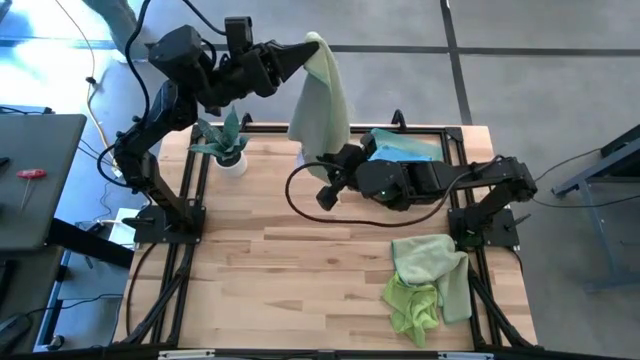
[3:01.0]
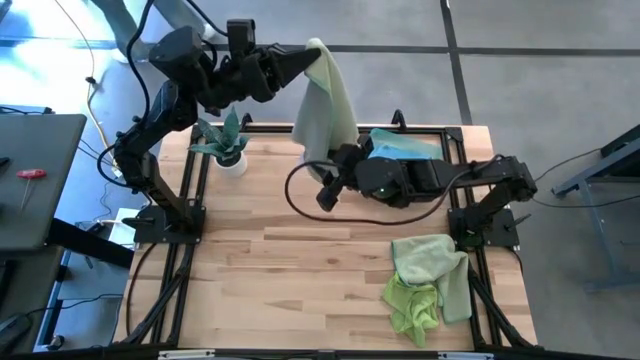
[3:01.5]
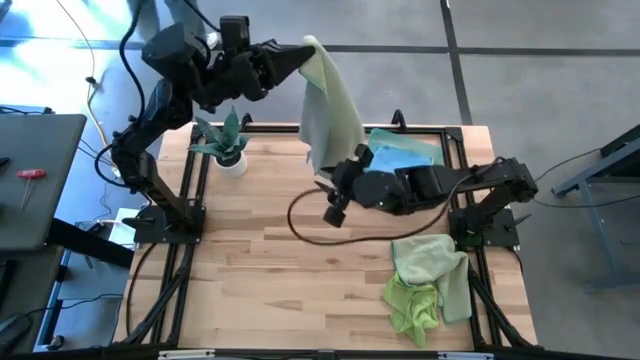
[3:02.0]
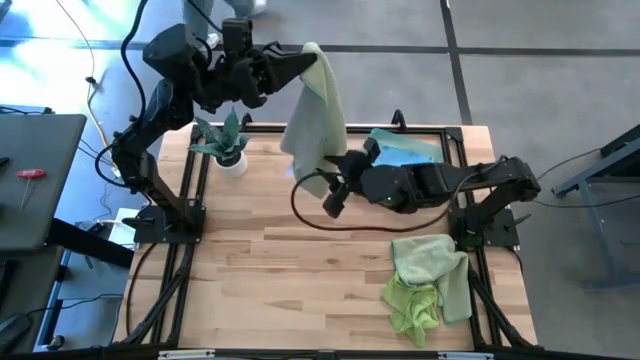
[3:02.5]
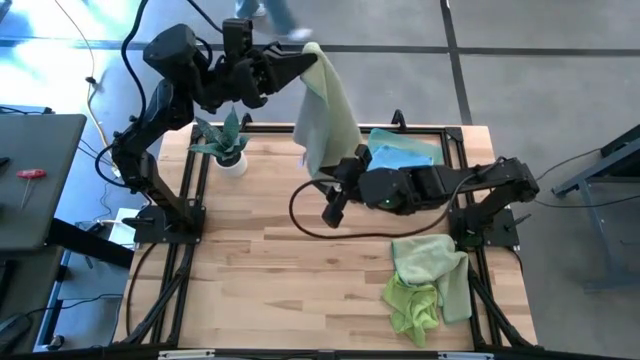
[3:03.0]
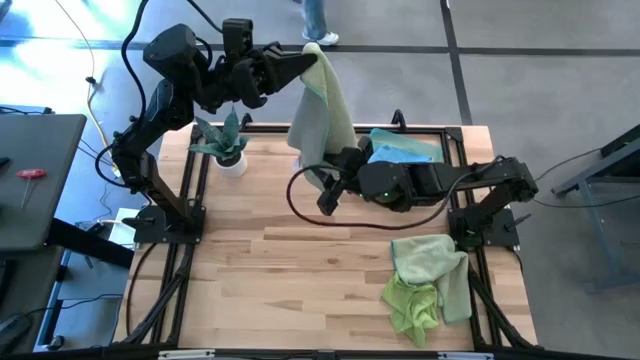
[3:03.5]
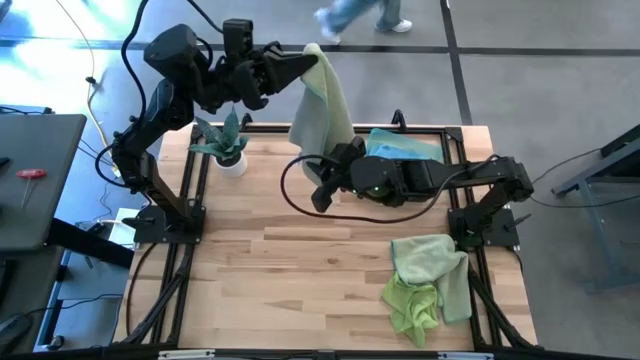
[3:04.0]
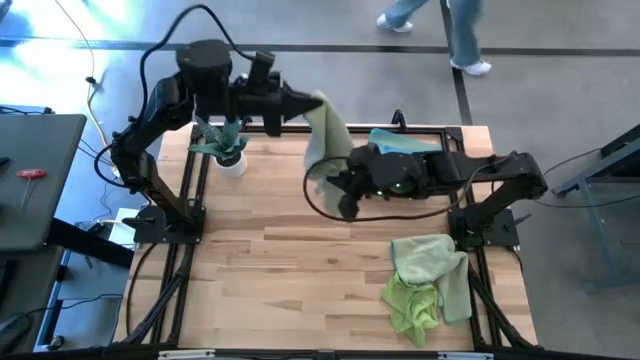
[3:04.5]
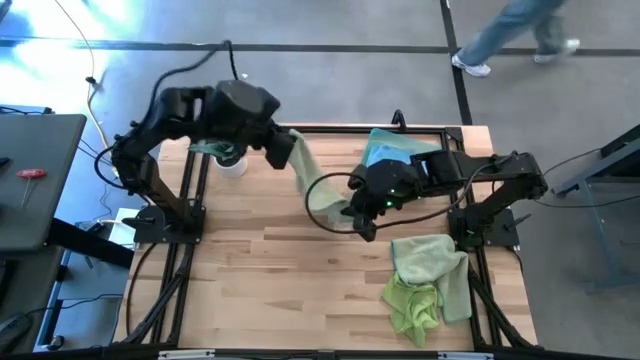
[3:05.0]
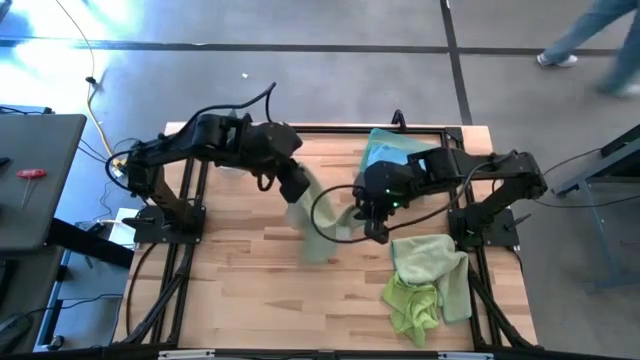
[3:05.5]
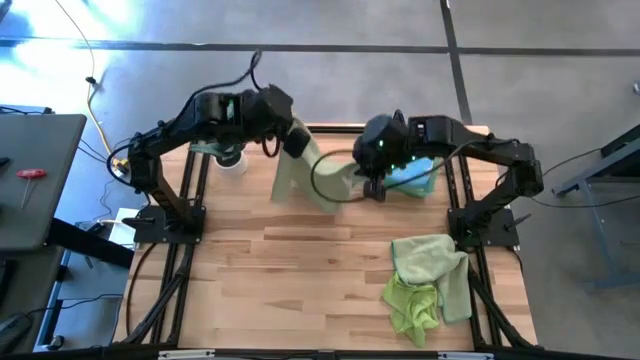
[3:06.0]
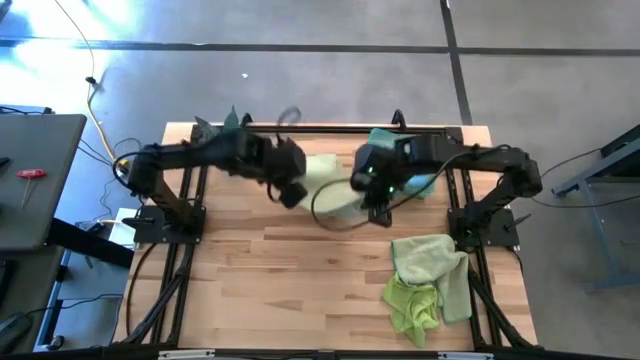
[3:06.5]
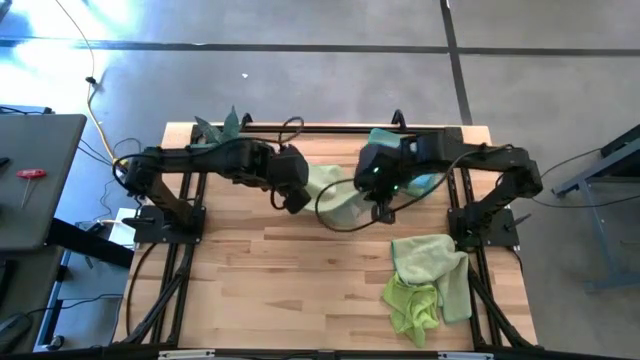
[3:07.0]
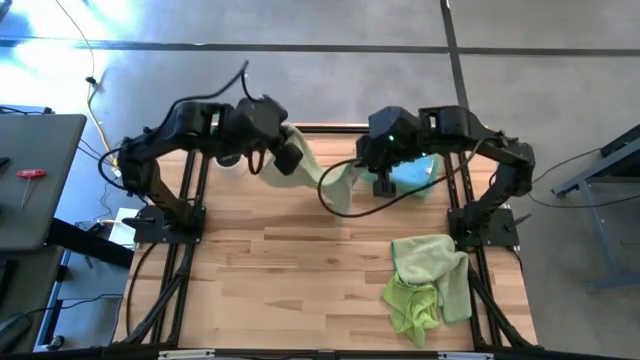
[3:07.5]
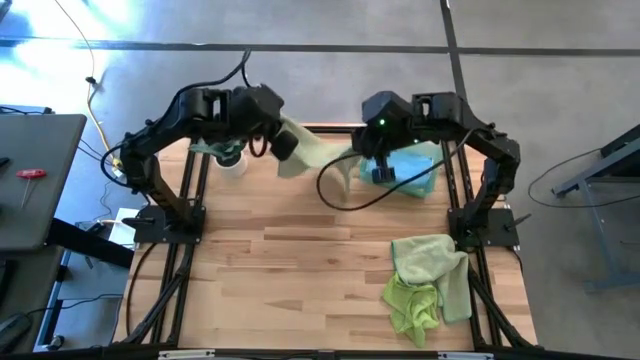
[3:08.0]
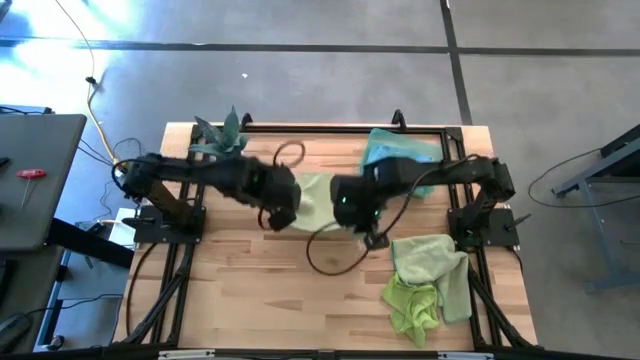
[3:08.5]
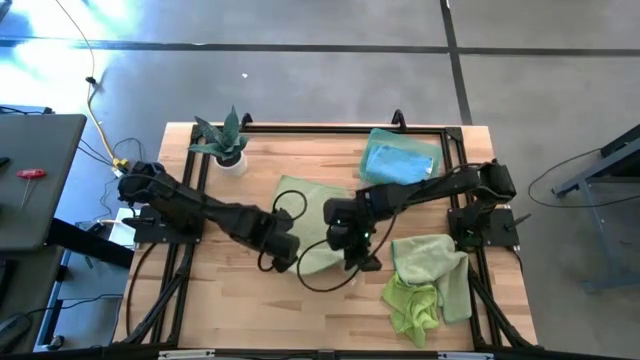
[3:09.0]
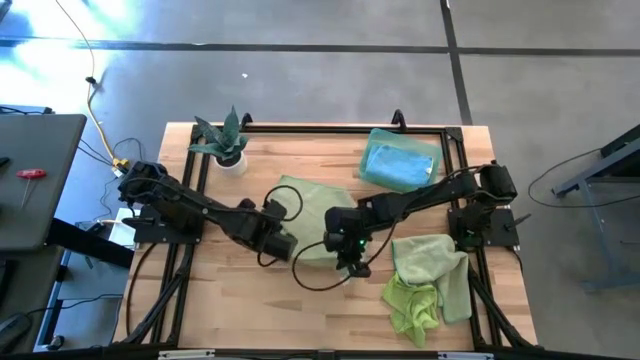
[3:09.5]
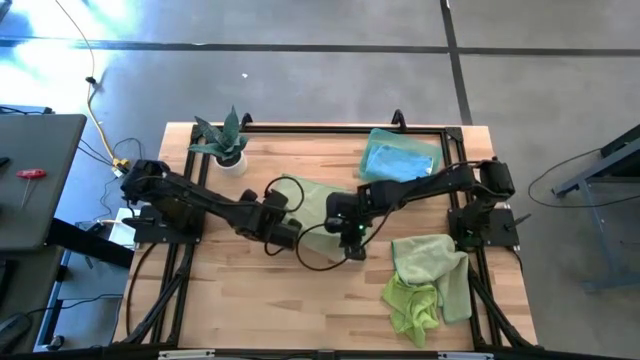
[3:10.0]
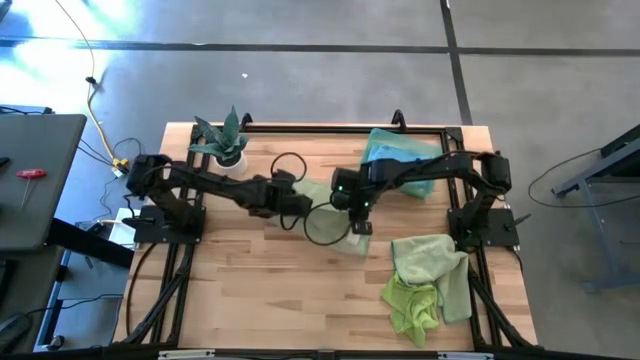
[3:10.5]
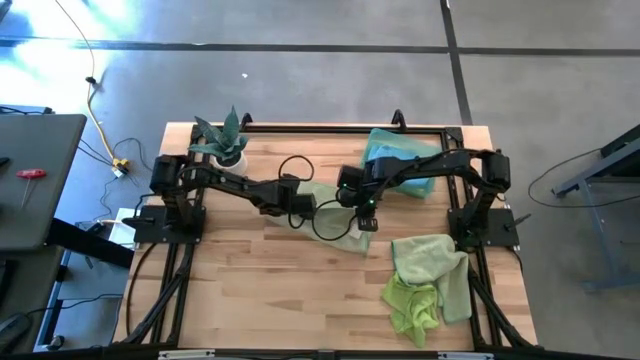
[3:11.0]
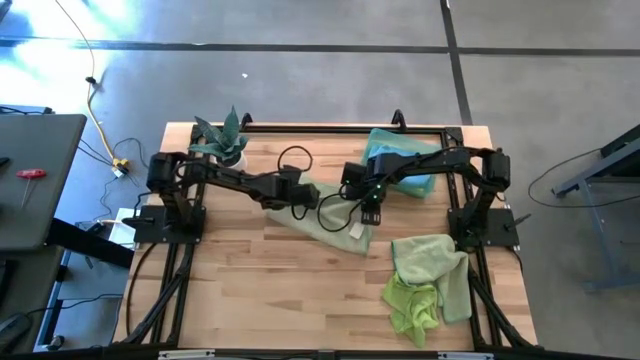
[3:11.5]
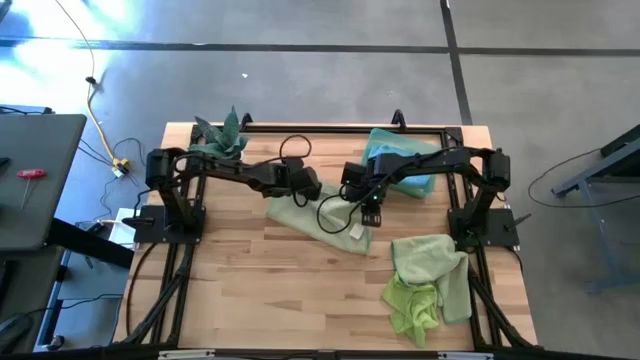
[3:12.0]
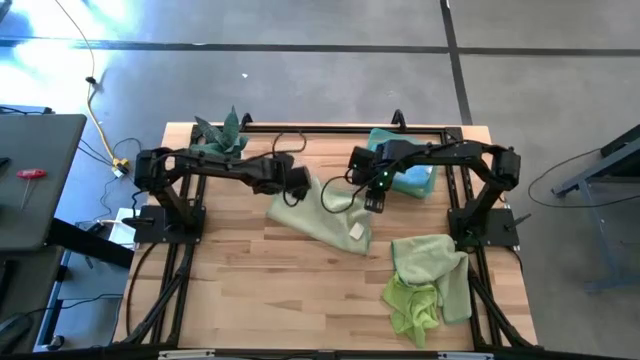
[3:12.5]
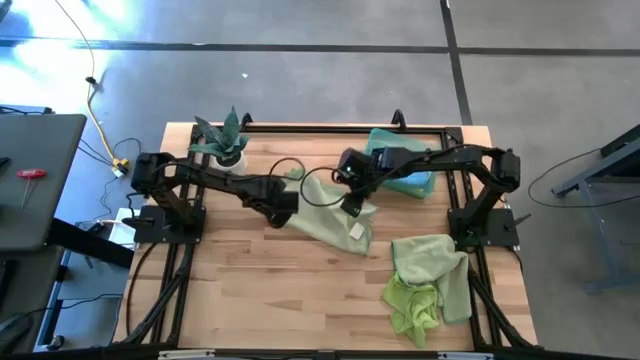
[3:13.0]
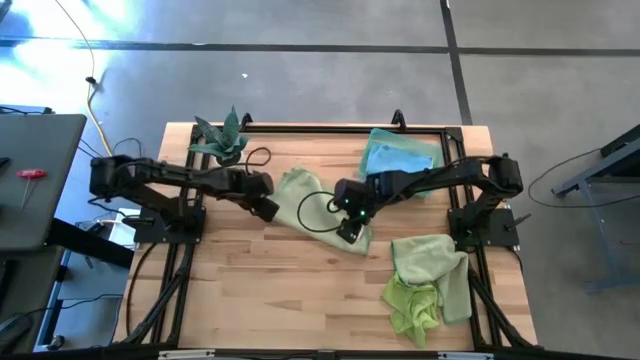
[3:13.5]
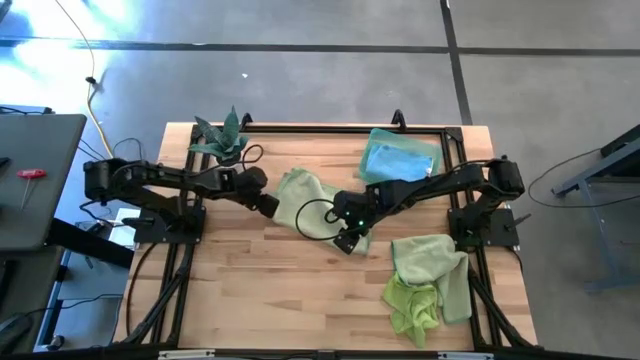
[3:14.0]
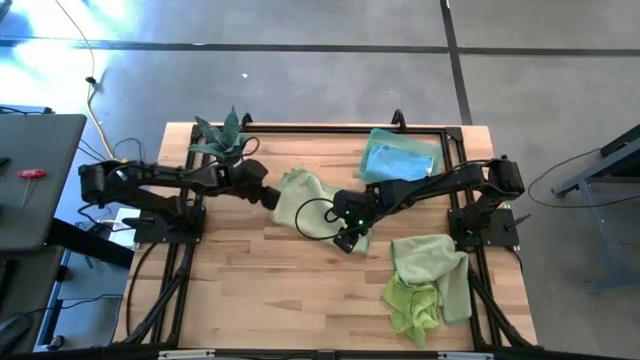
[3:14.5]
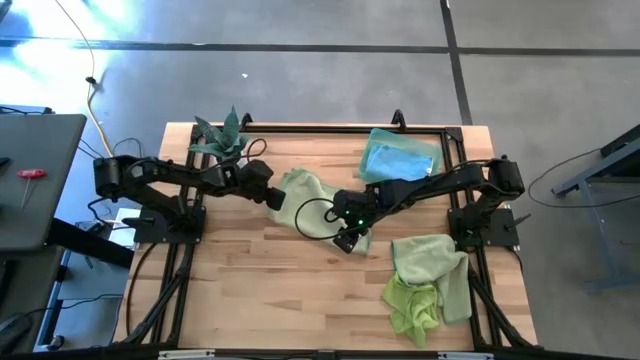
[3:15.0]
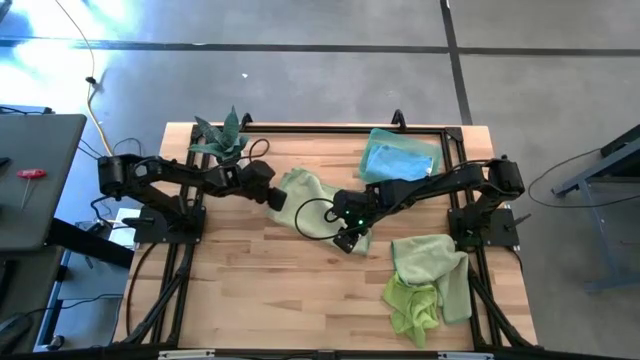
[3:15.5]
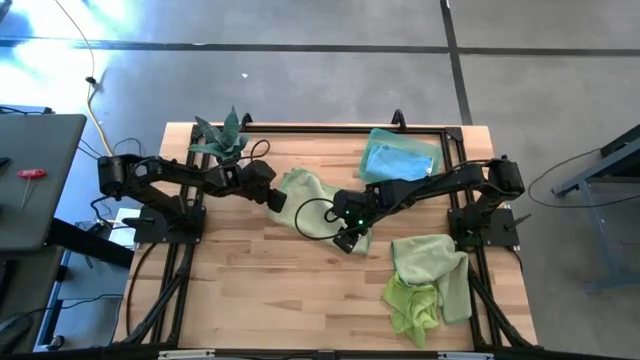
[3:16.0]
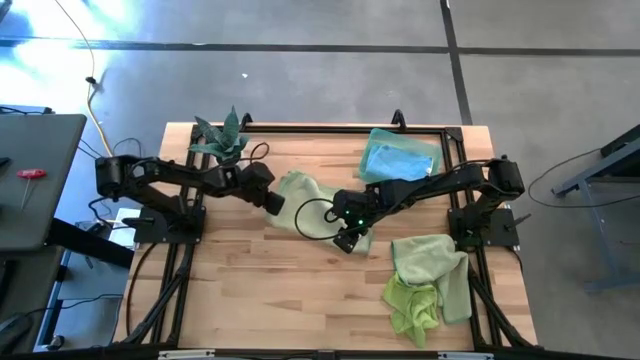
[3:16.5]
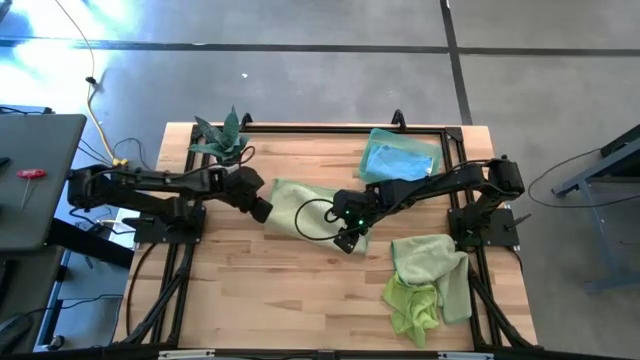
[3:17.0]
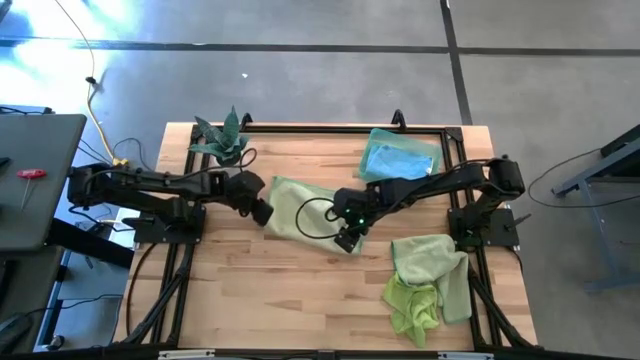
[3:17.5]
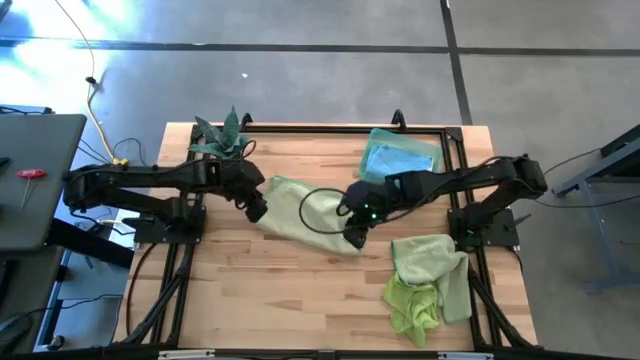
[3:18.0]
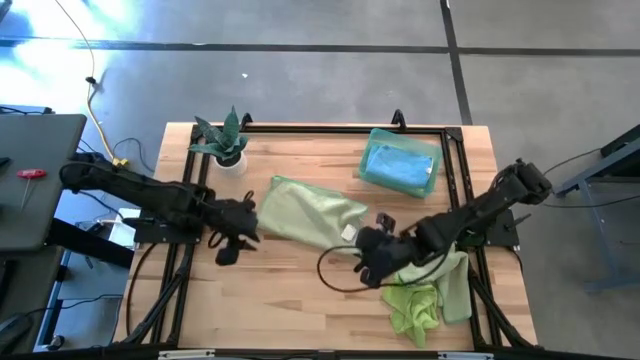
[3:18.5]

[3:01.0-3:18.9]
Task: Fold microfiber towels
Fold the left green microfiber cloth

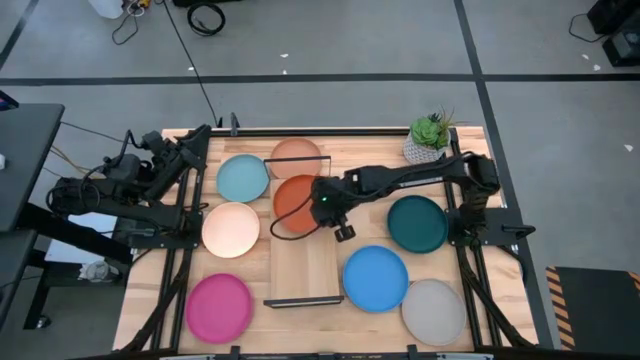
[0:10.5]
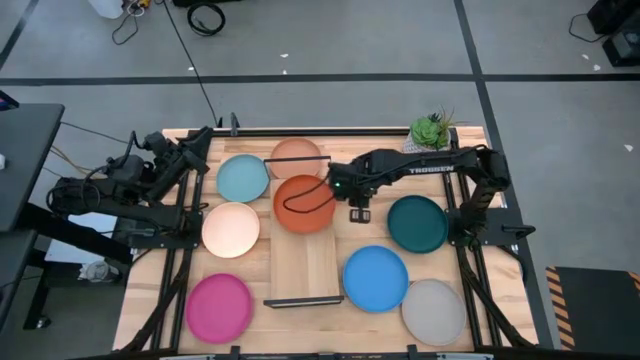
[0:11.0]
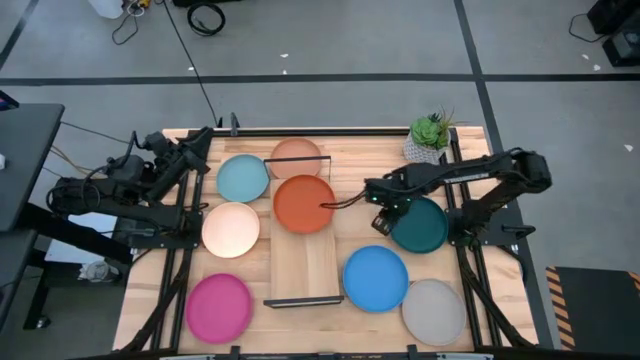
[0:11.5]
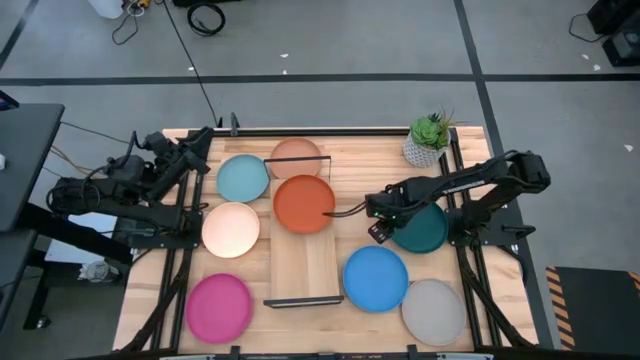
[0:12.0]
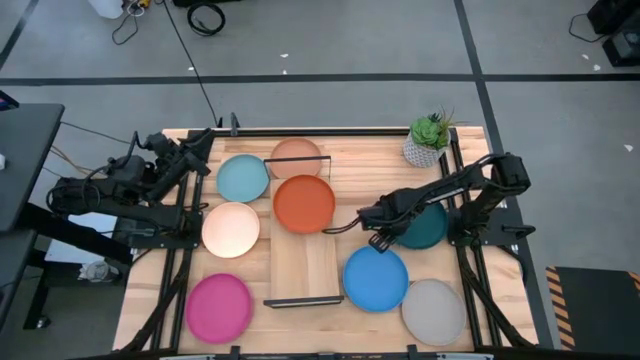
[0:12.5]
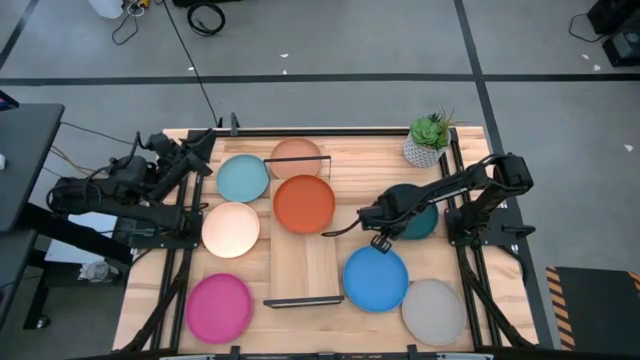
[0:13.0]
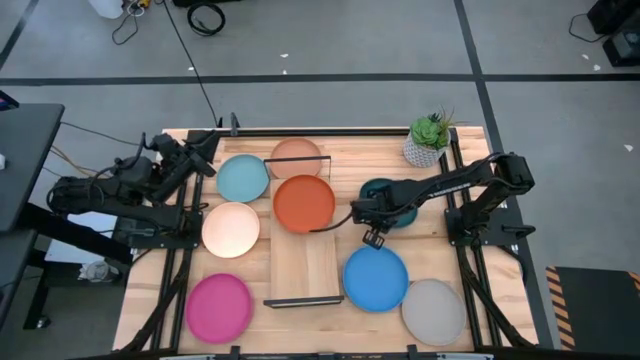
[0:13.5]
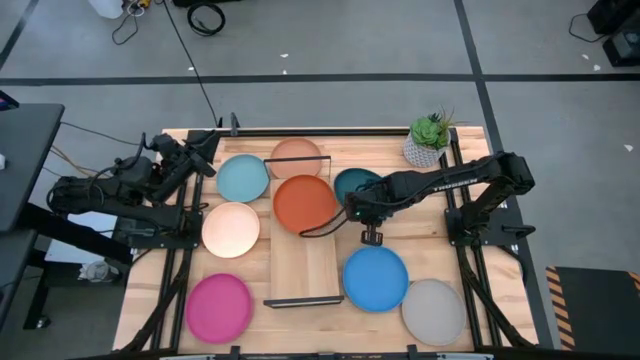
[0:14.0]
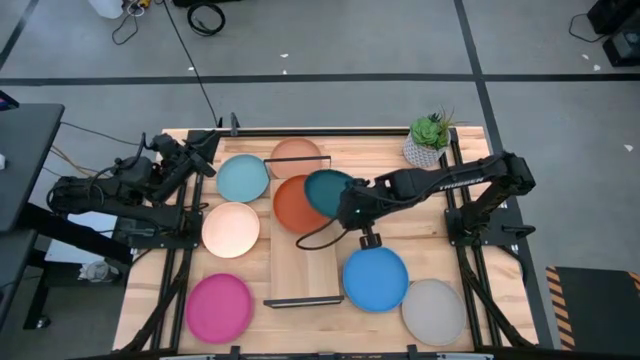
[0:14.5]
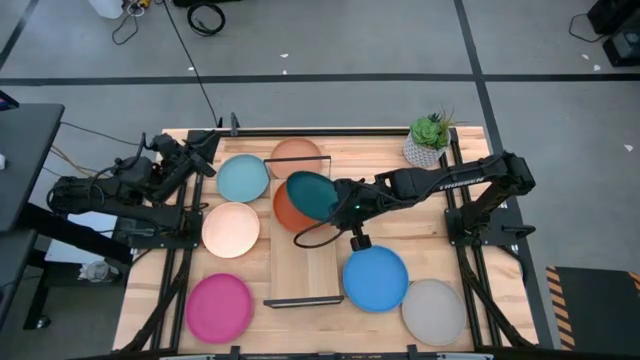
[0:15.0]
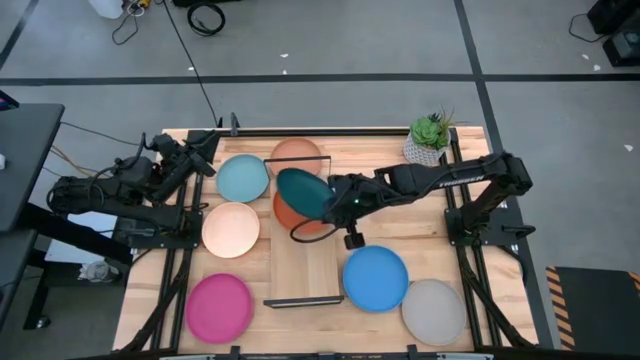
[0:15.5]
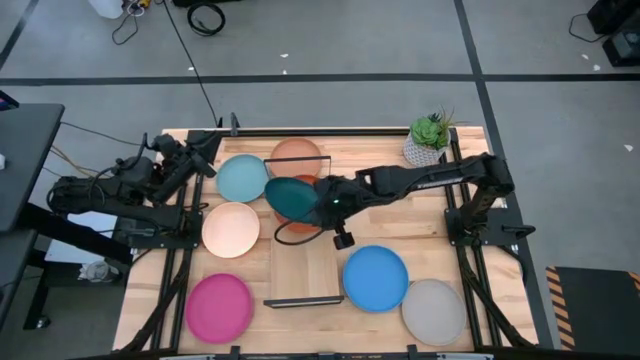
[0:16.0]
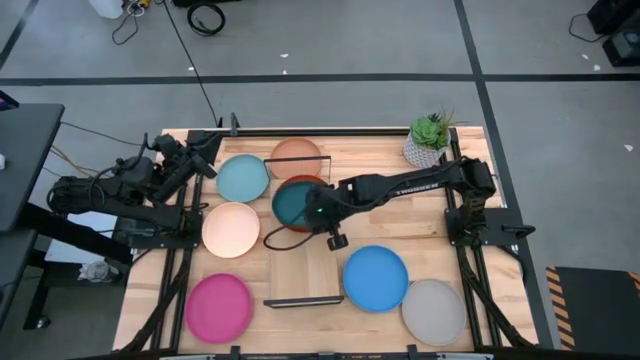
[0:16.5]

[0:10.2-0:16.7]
Task: Place and stack plates onto a shelf
Stack the dark green plate on top of the orange plate on the shelf
